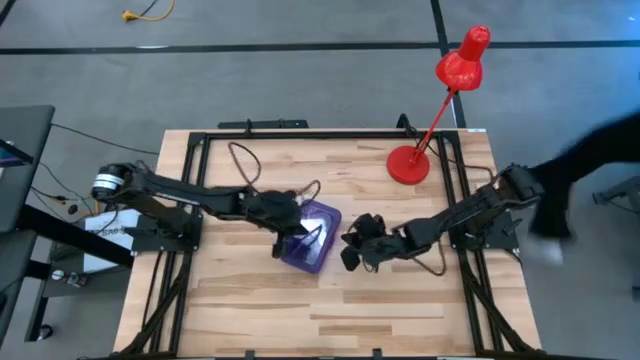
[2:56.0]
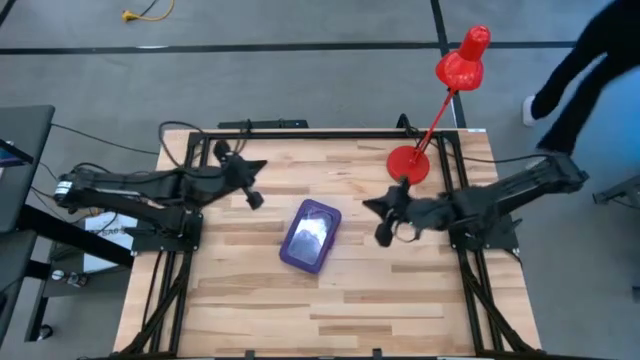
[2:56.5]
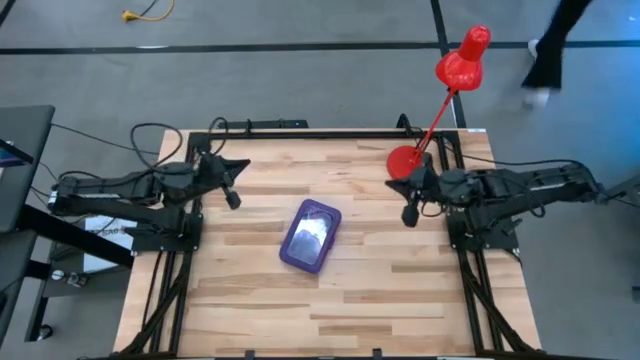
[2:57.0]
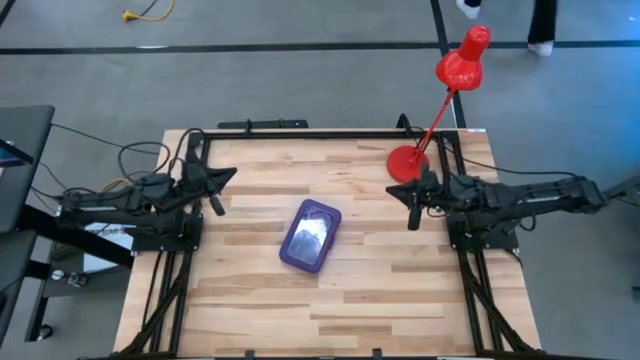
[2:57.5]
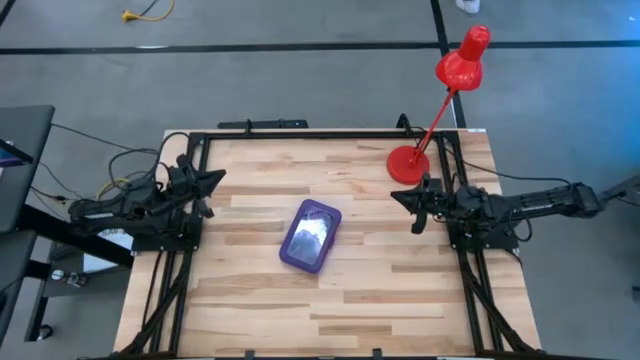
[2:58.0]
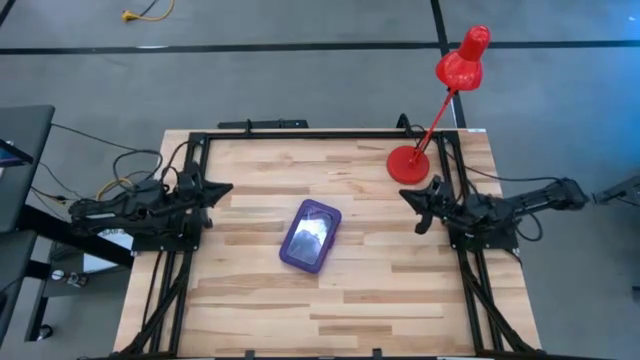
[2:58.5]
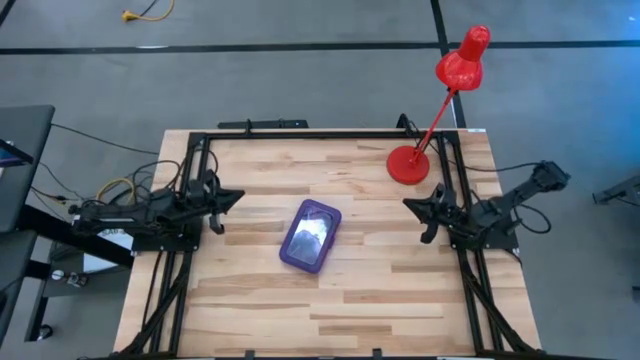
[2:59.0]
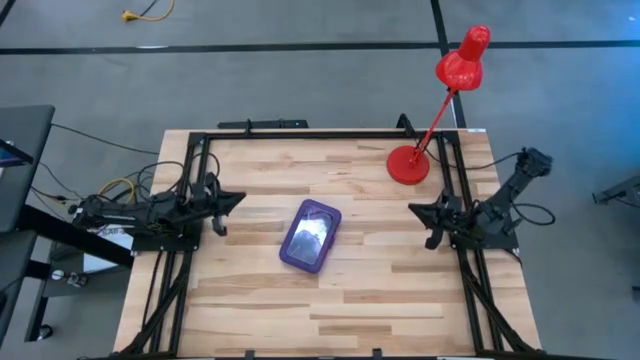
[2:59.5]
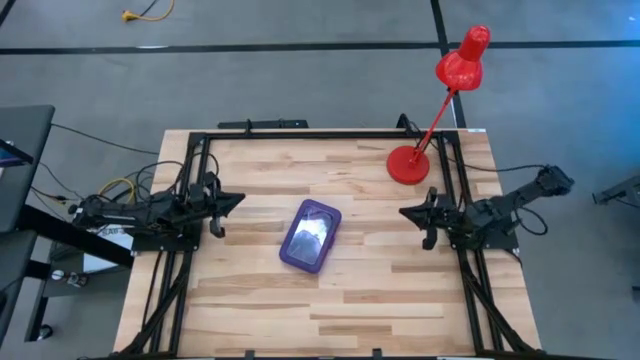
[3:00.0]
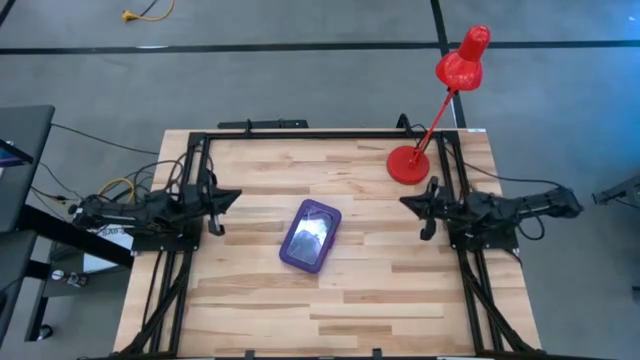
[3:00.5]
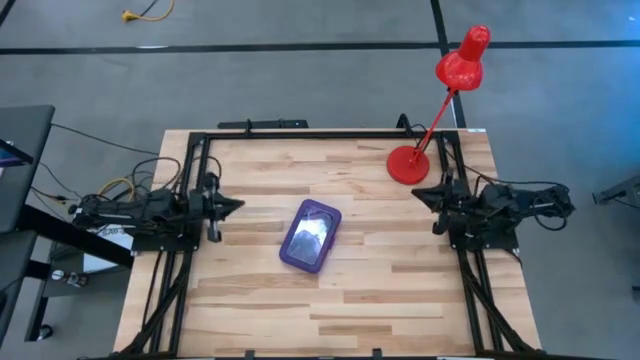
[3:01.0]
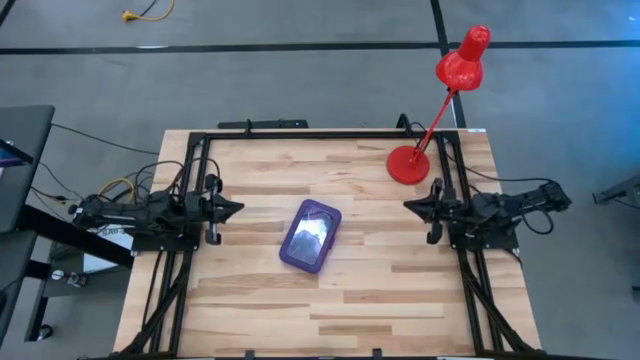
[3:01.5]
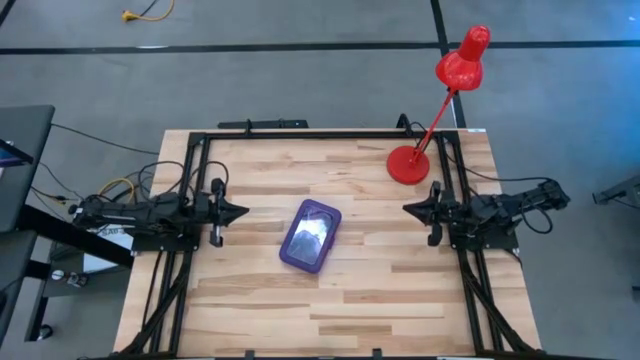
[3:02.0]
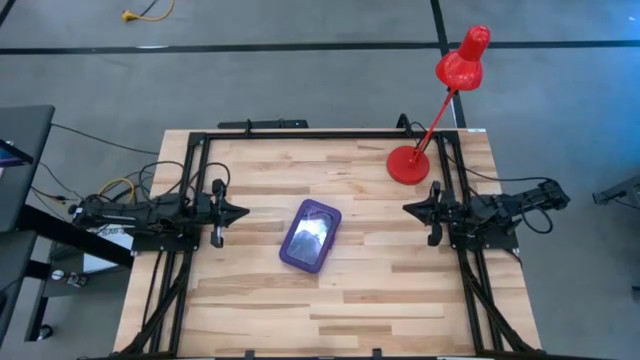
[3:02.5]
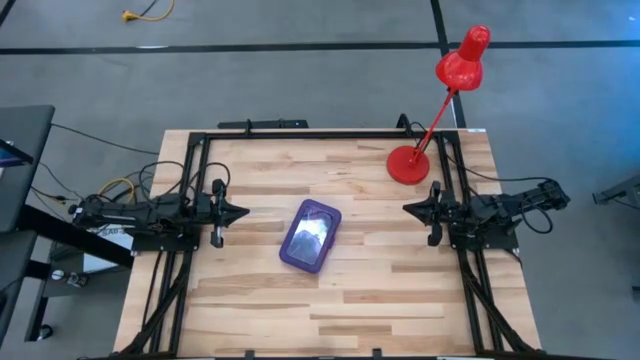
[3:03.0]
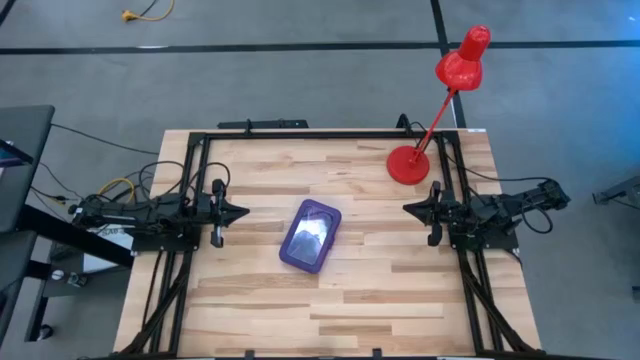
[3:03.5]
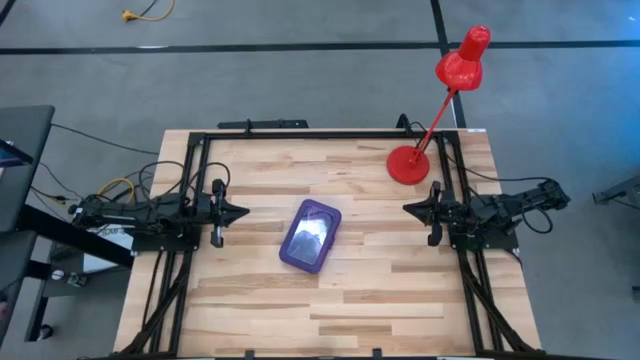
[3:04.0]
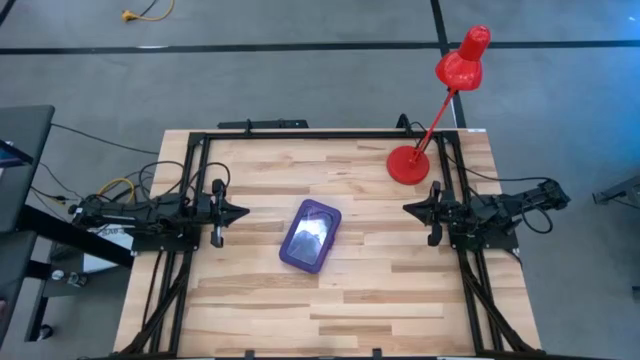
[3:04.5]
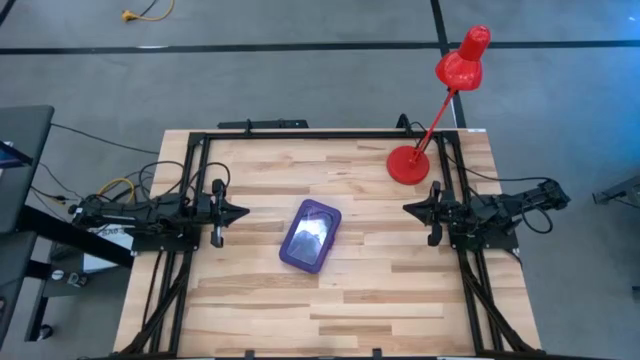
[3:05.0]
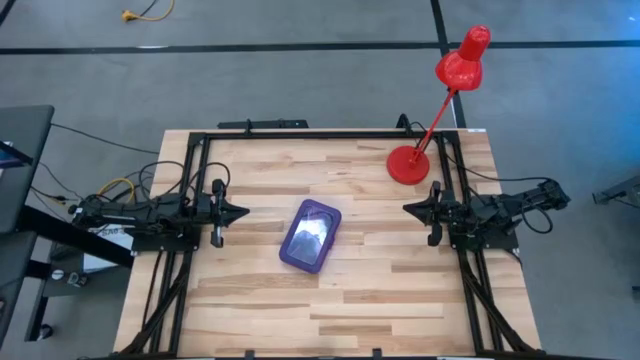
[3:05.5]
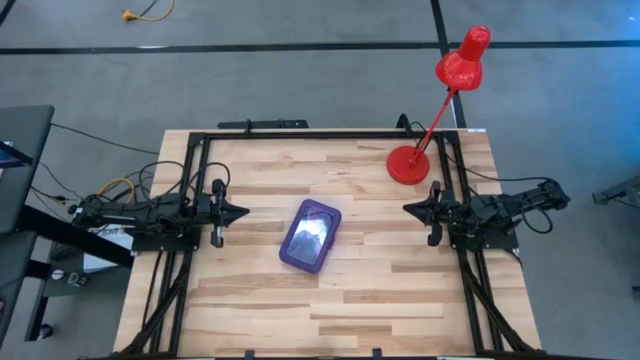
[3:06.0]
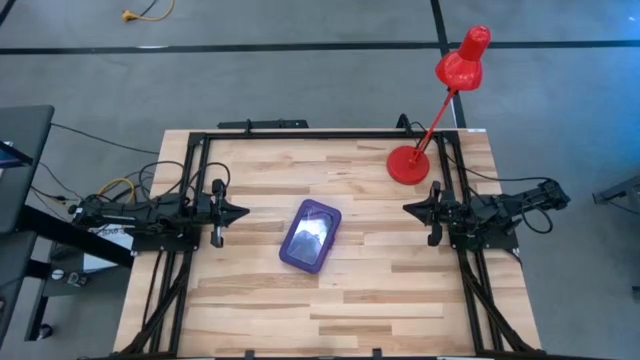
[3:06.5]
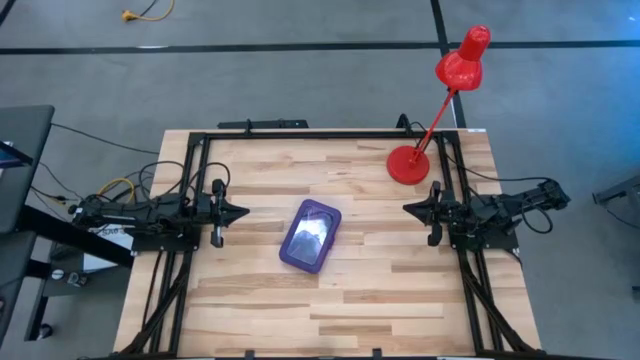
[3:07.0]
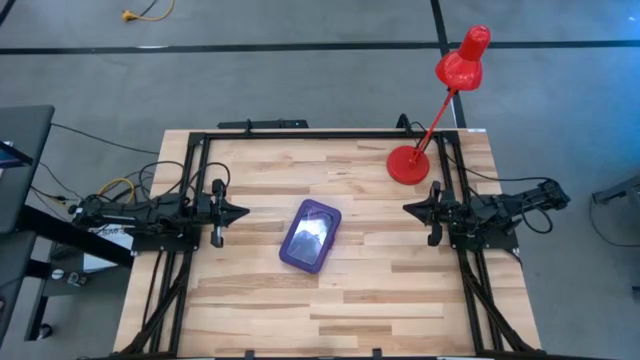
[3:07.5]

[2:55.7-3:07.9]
Task: Pick & place school supplies into a supply box
Return to Home Position

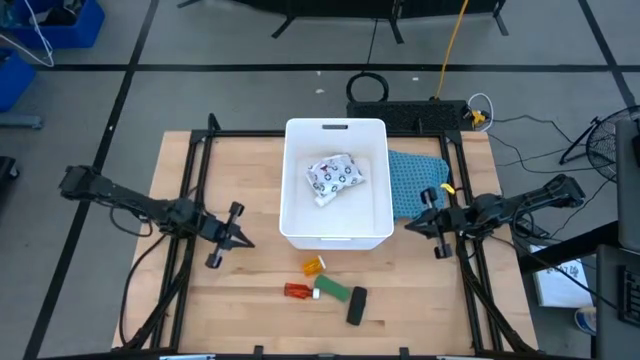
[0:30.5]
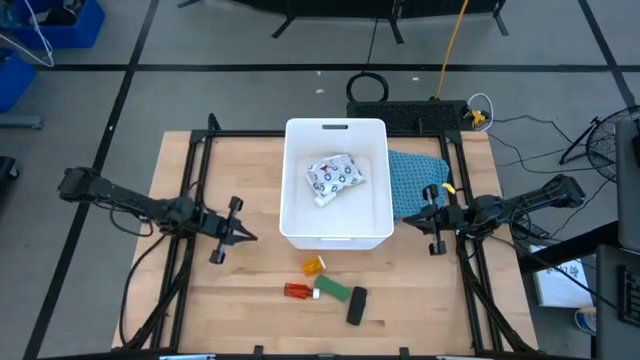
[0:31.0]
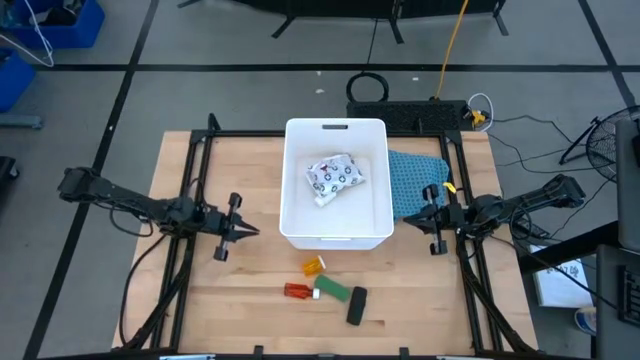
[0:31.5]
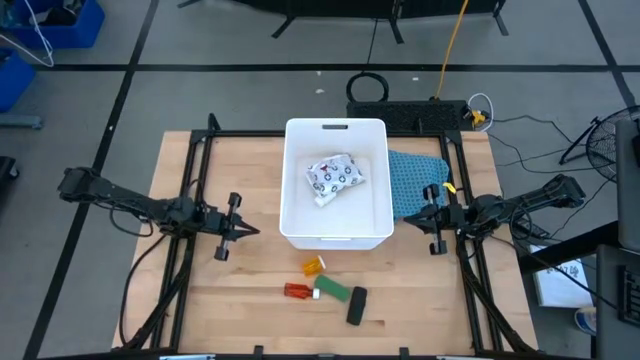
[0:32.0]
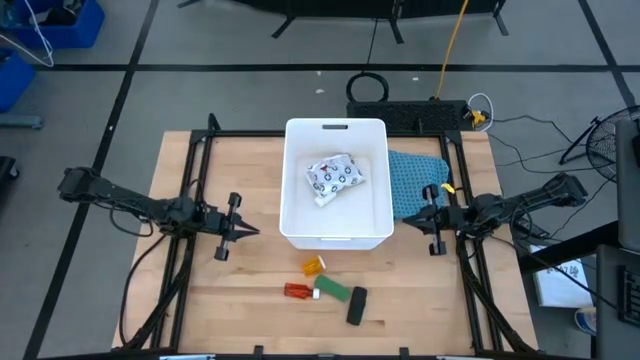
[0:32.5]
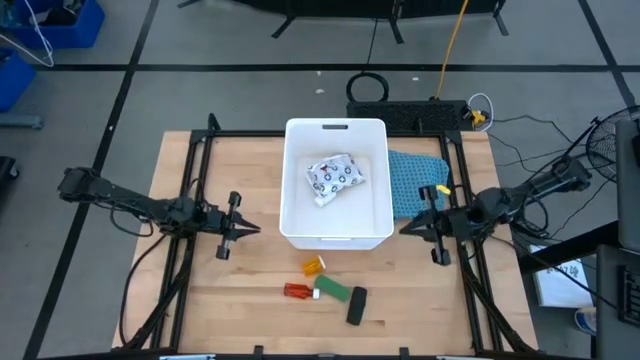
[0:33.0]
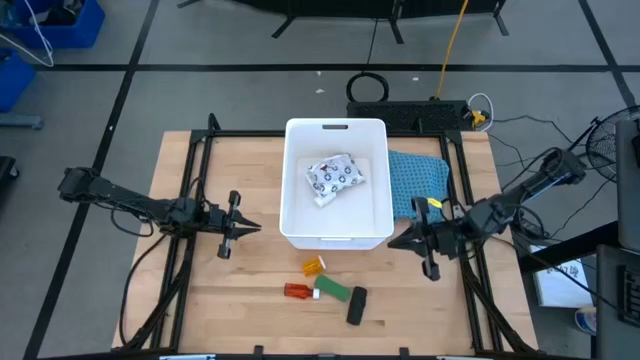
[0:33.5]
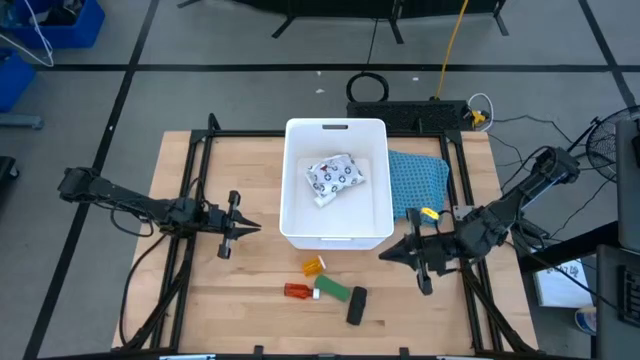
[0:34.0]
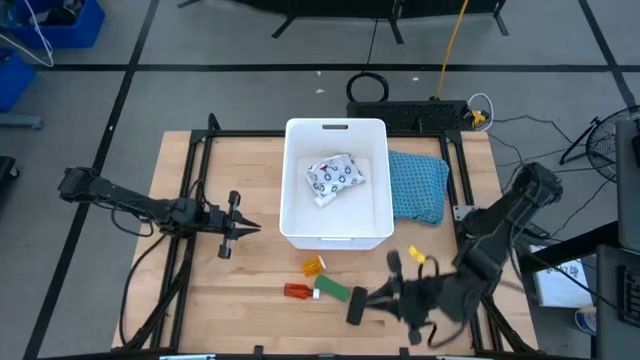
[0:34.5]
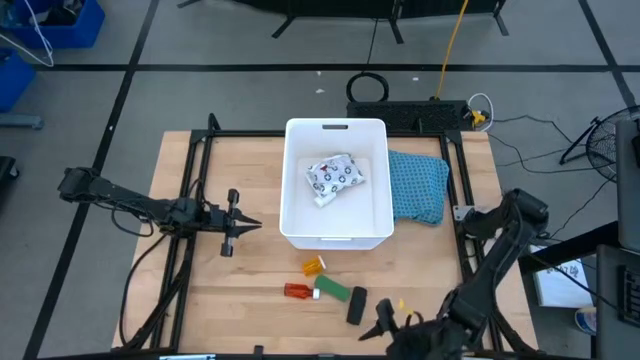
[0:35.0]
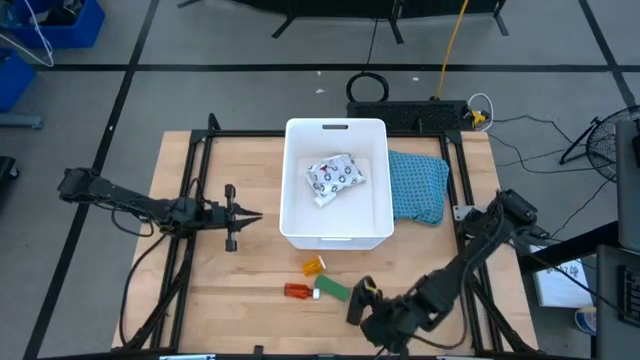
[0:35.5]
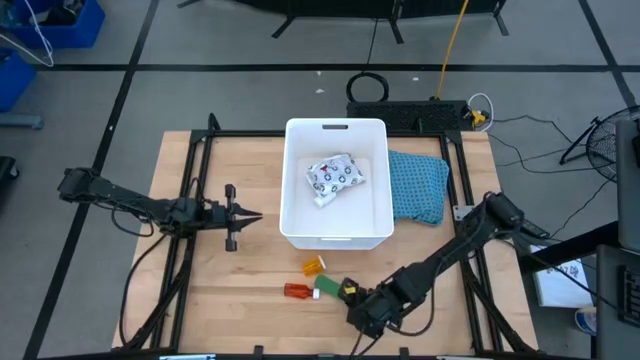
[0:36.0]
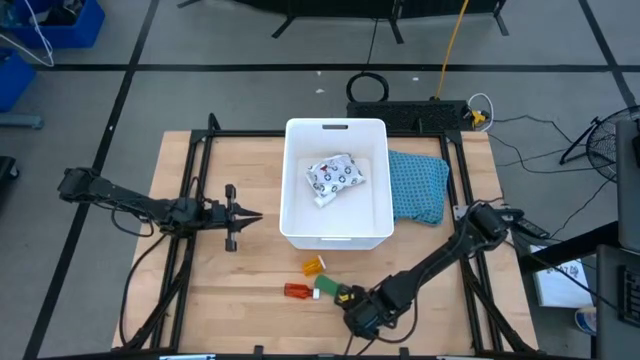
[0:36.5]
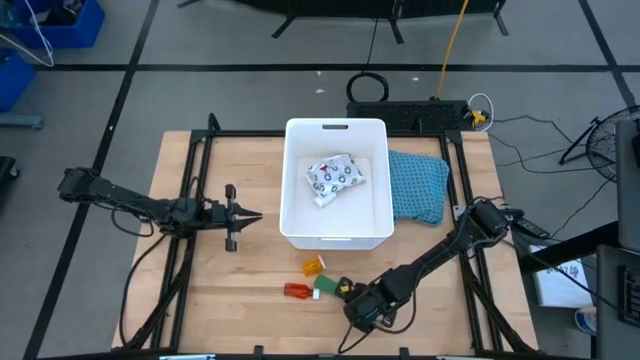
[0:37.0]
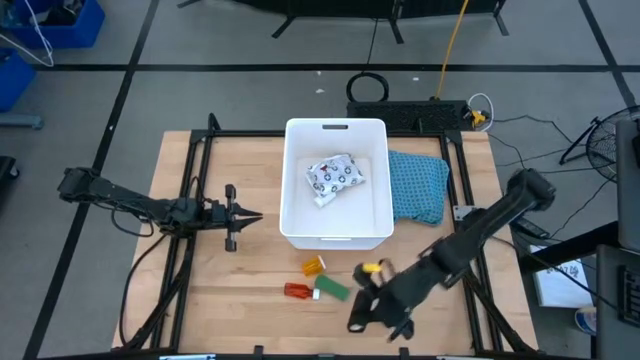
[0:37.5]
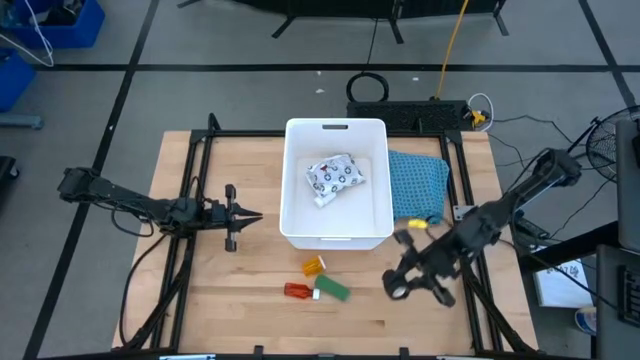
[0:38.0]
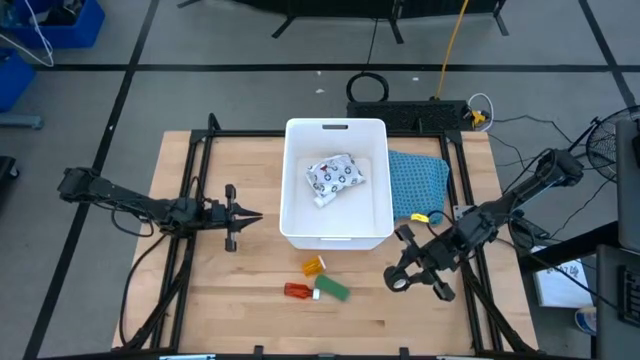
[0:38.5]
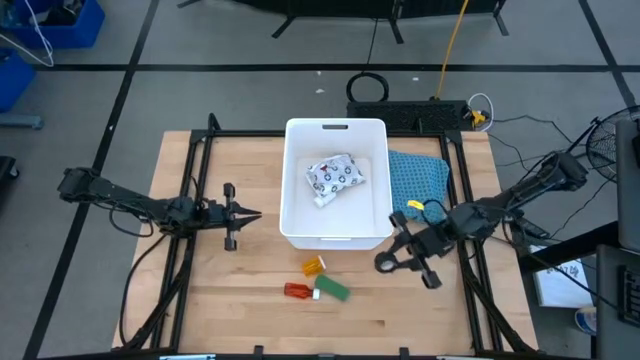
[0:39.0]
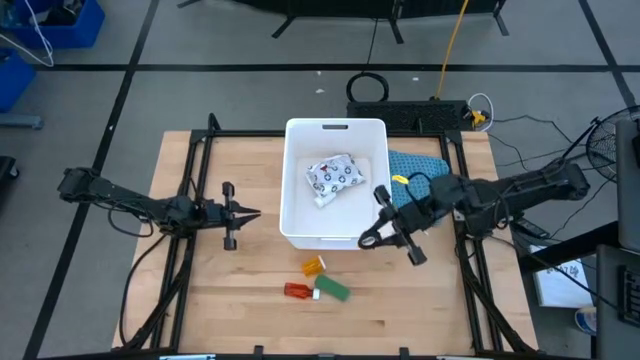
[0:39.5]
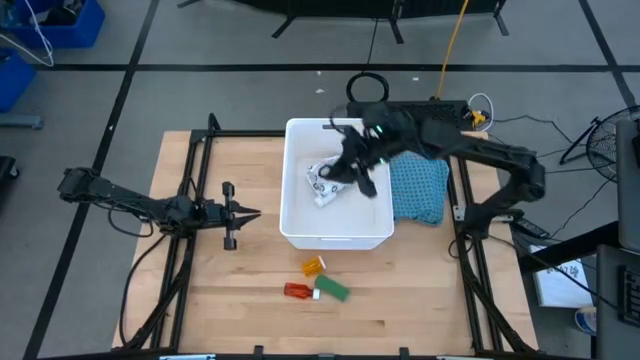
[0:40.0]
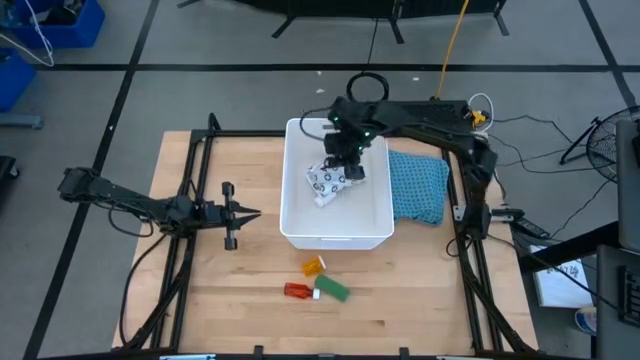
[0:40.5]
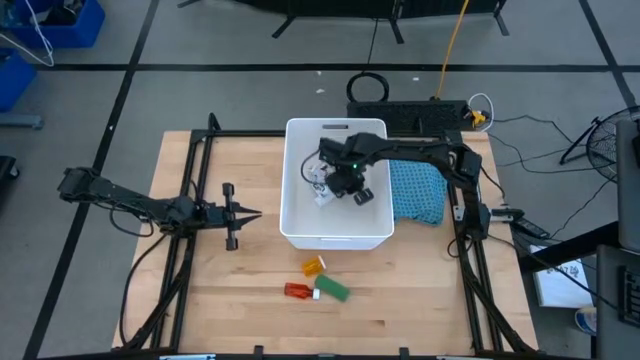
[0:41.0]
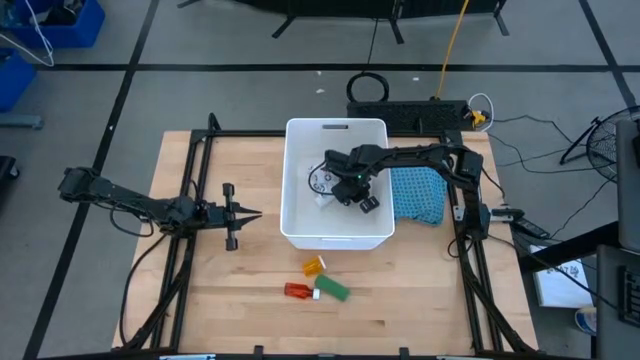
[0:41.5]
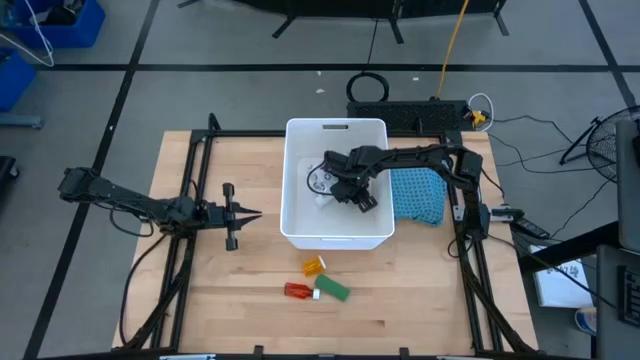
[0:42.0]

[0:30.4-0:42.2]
Task: Pick & place medical supplies in basket/bin
Put the black bandage into the white bin
